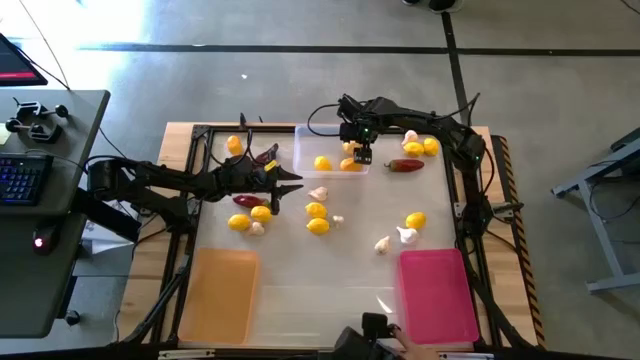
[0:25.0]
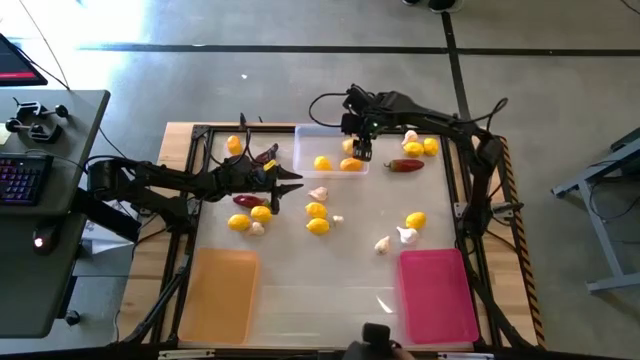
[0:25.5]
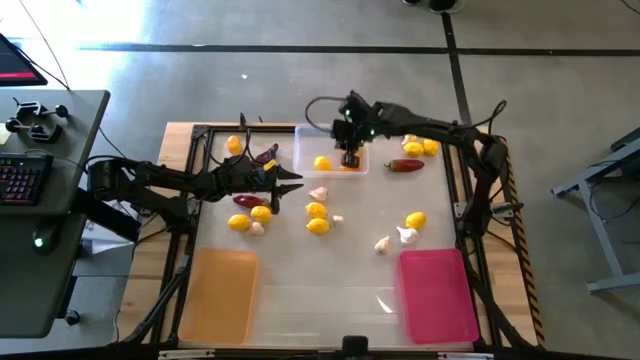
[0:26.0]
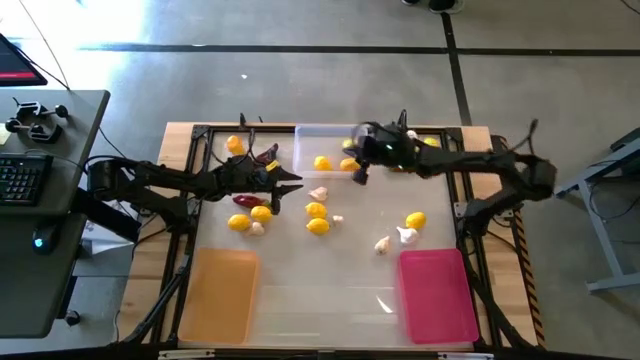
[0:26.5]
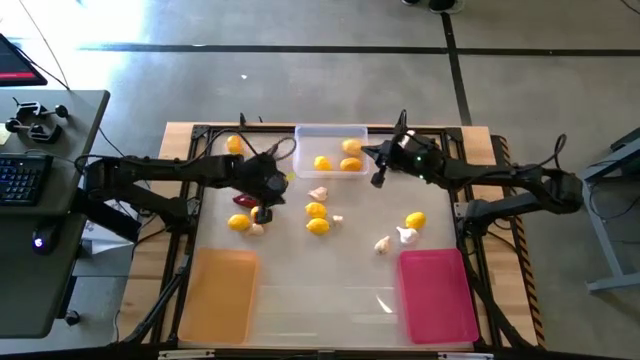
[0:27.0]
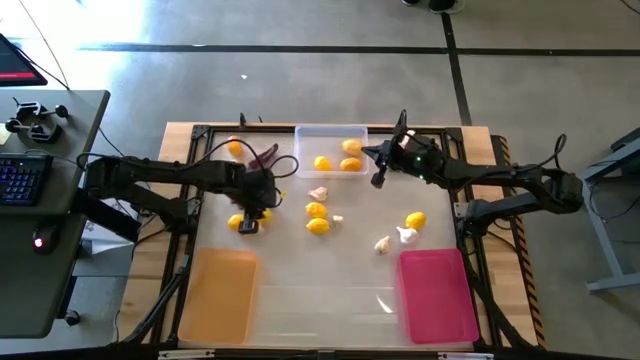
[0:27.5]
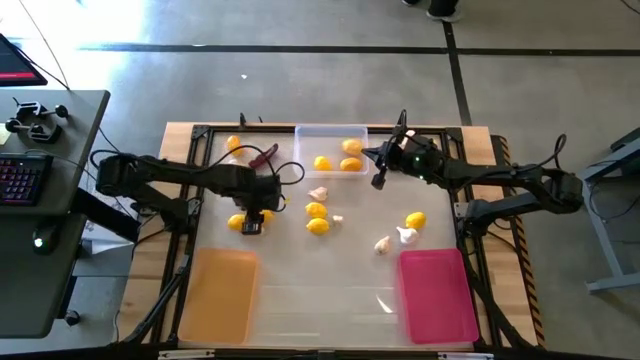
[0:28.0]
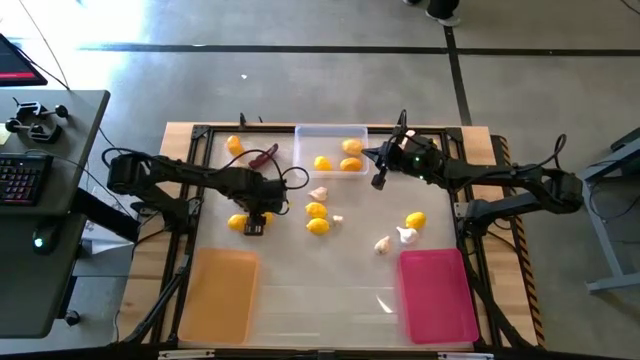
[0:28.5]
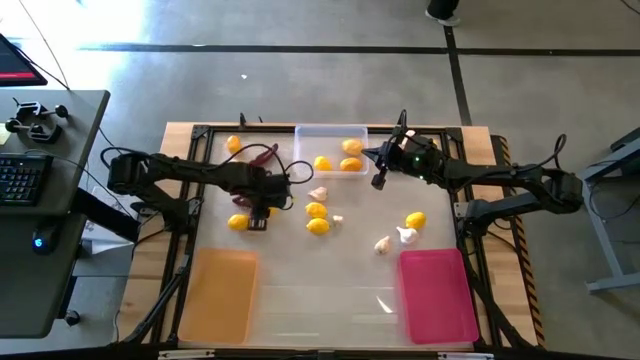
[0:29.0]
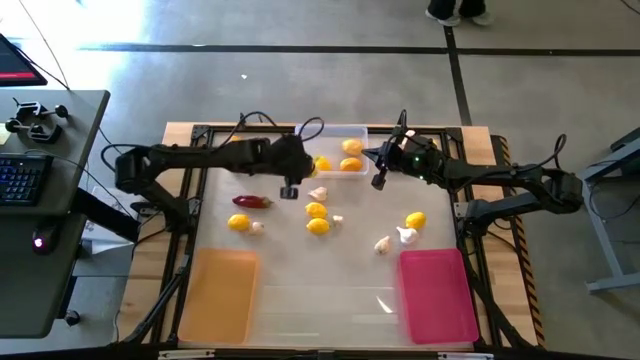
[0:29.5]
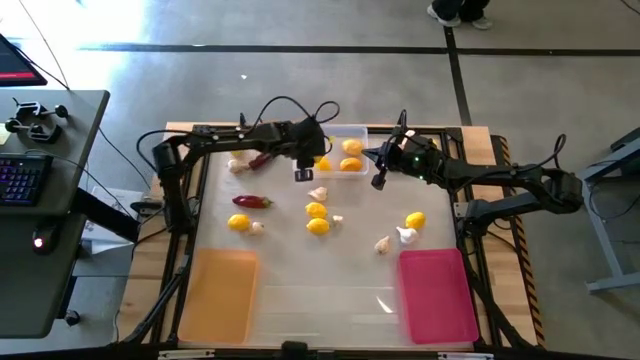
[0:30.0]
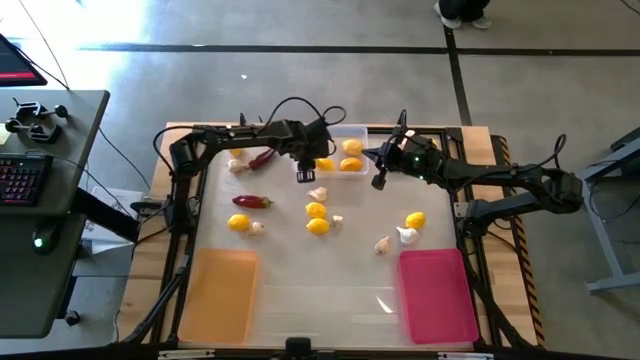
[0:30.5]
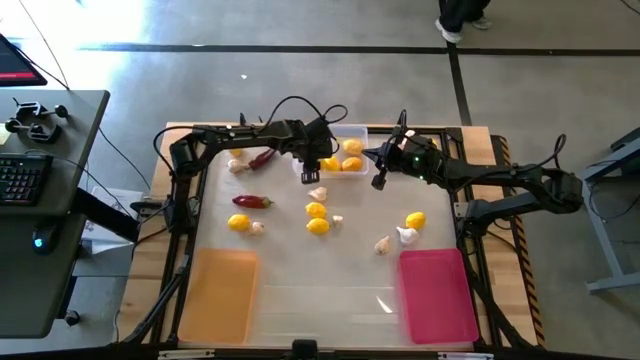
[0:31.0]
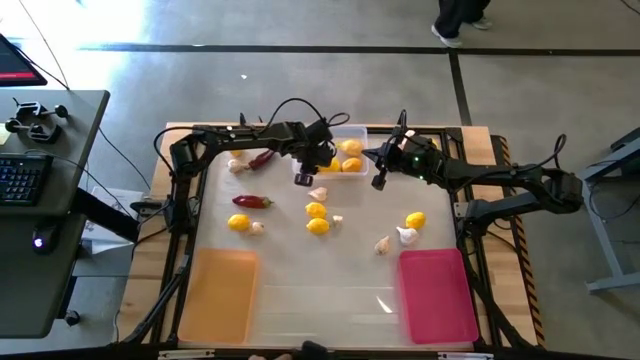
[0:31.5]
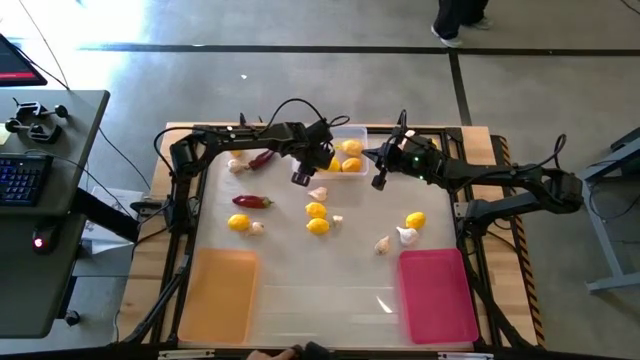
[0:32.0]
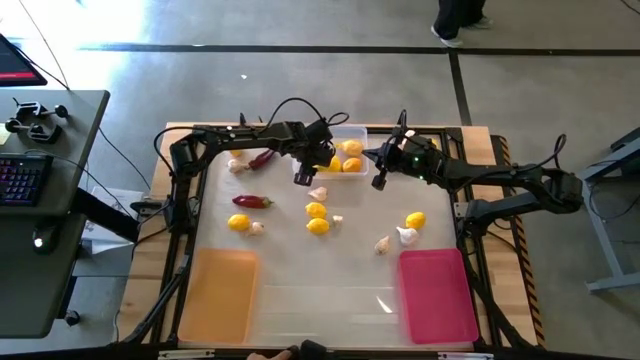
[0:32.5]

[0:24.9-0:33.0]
Task: Sort produce into baskets
Put the bottom left lemon into the transparent bin

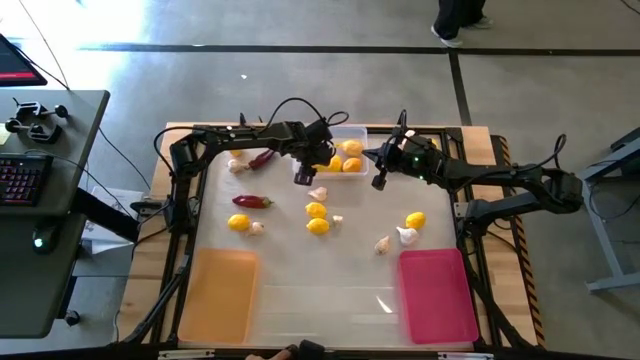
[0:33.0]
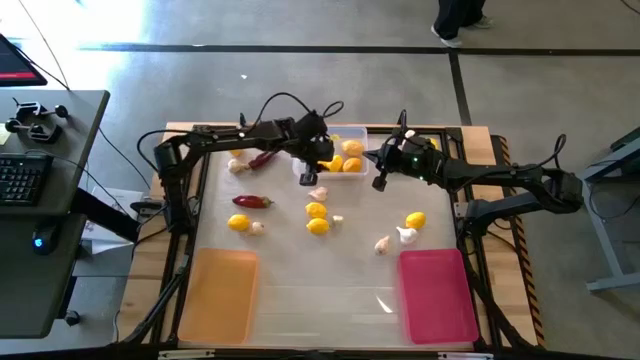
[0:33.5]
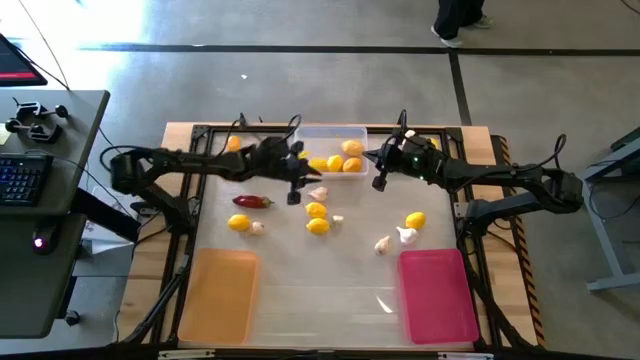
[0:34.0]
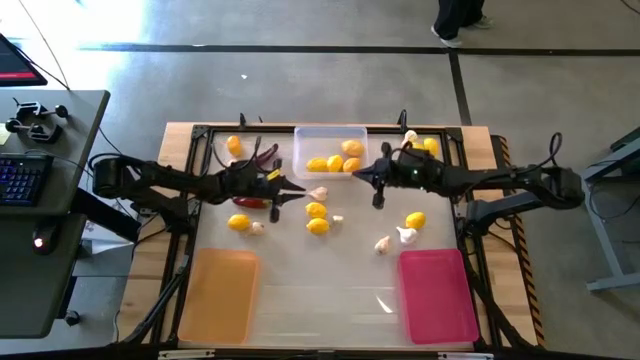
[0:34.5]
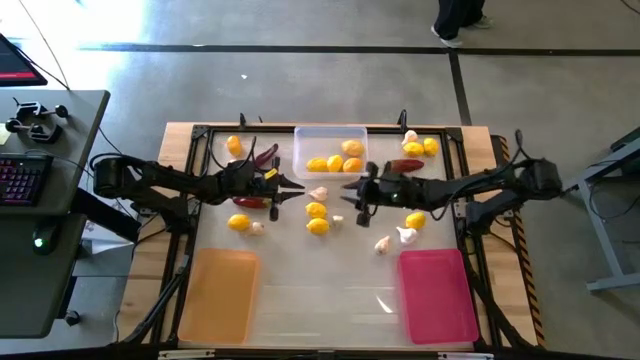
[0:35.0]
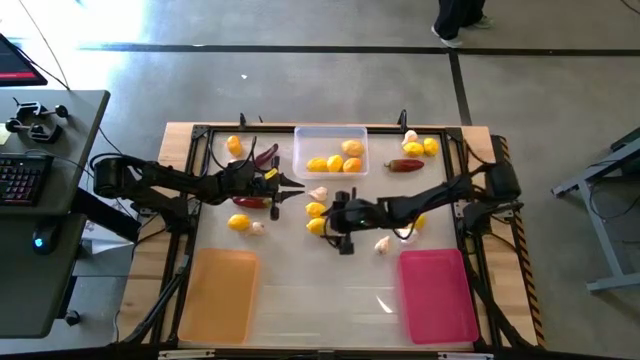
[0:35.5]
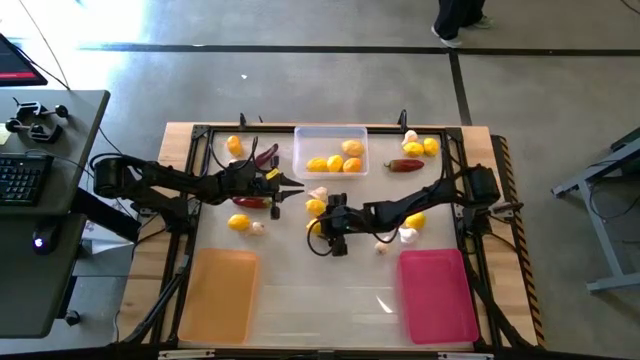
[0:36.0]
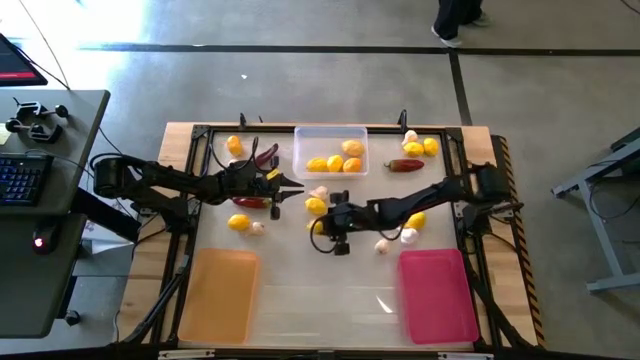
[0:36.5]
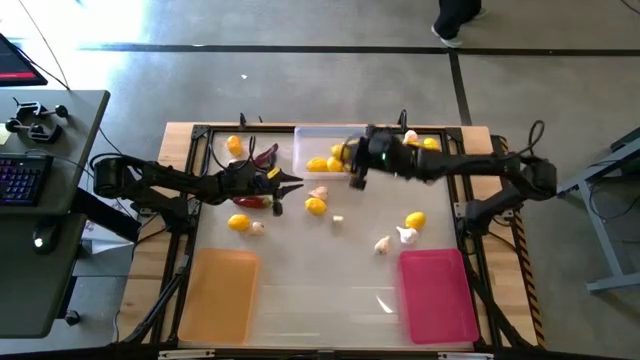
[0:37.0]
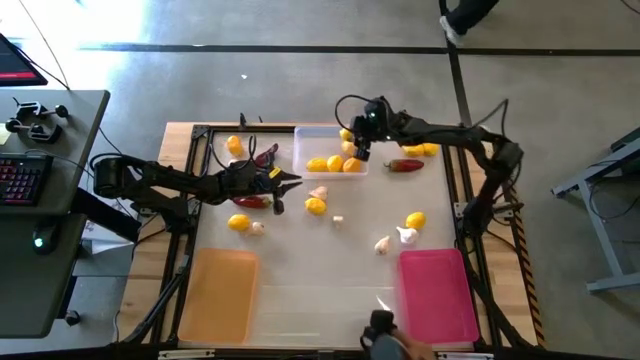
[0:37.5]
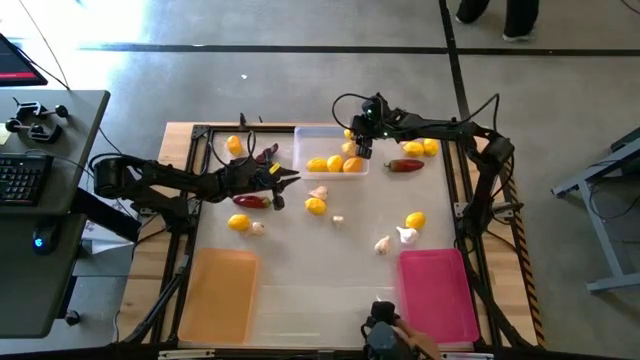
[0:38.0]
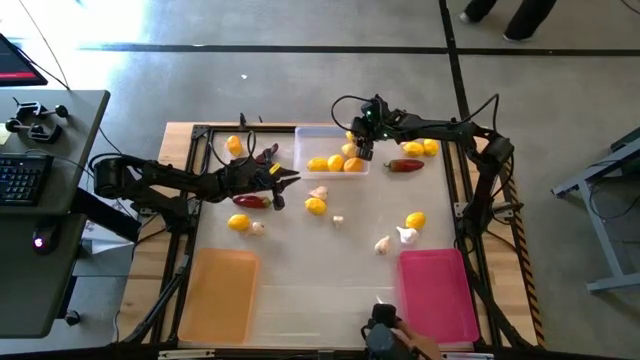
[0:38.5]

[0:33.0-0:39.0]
Put the bottom center lemon into the transparent bin

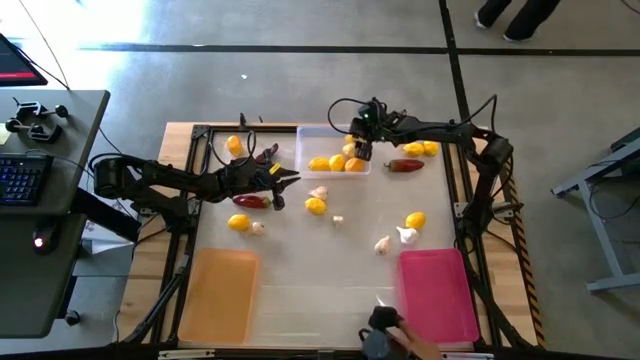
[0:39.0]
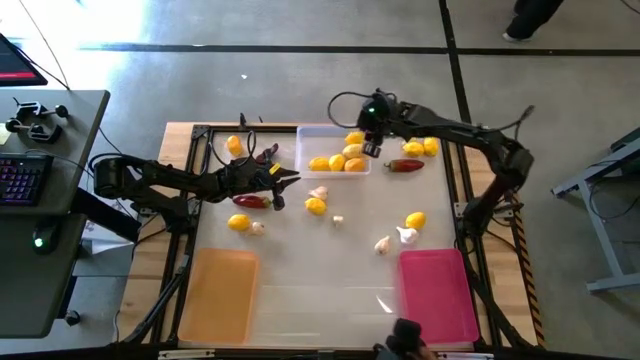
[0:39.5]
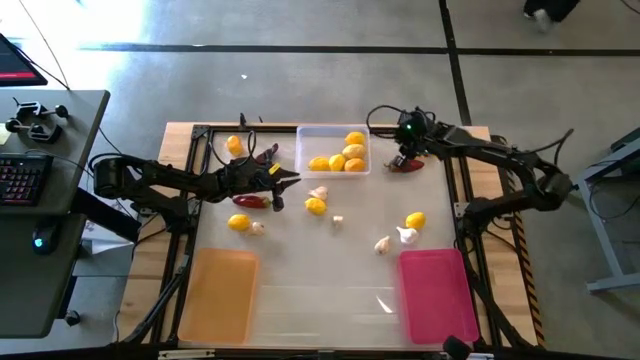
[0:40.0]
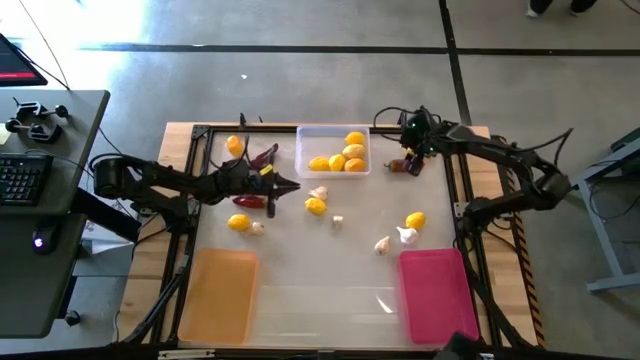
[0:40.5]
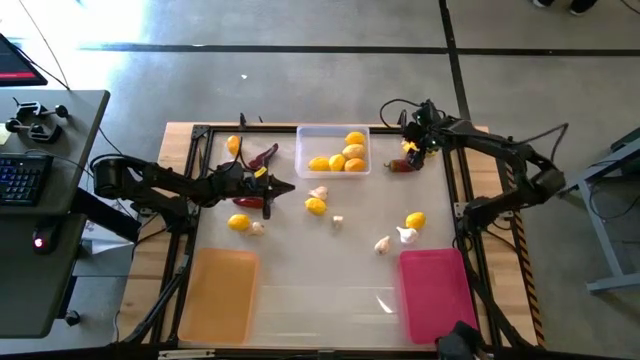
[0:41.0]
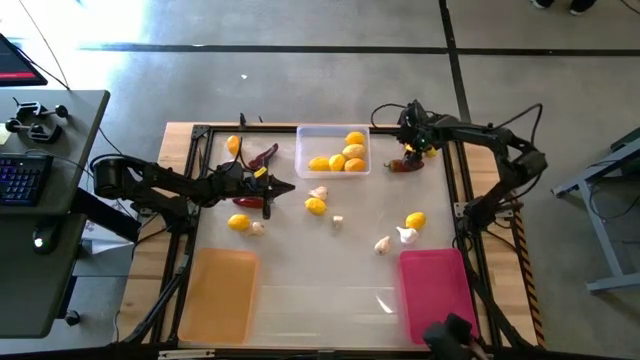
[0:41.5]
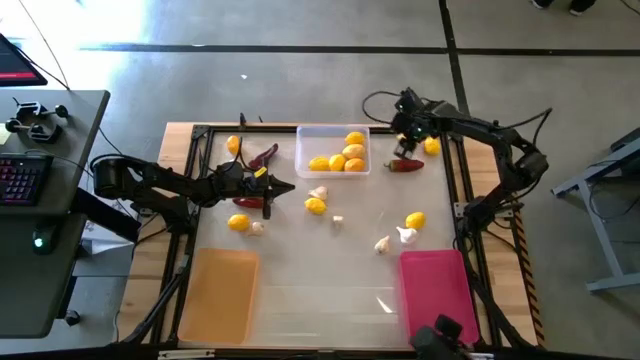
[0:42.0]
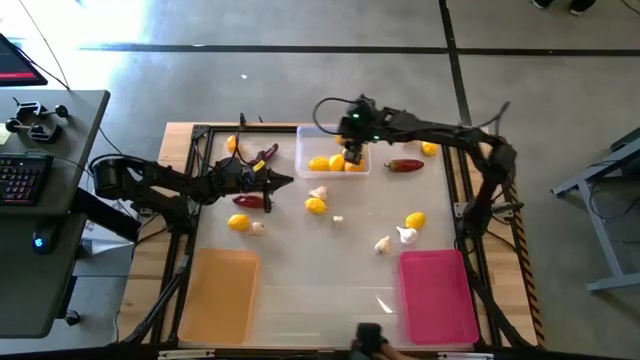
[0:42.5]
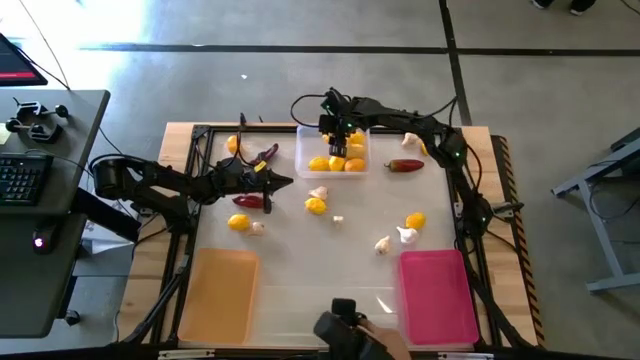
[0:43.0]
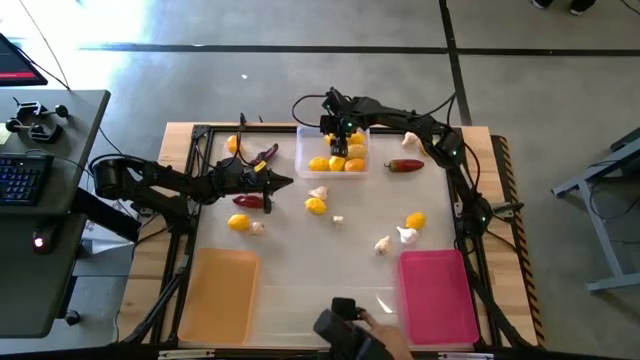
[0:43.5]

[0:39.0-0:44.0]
Put the top right lemon into the transparent bin

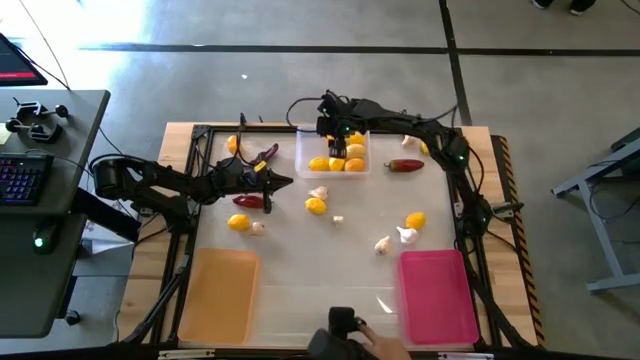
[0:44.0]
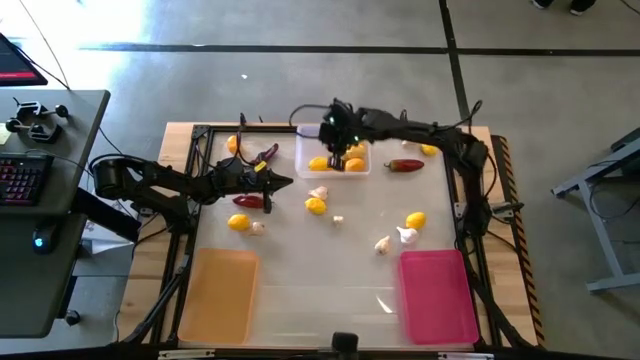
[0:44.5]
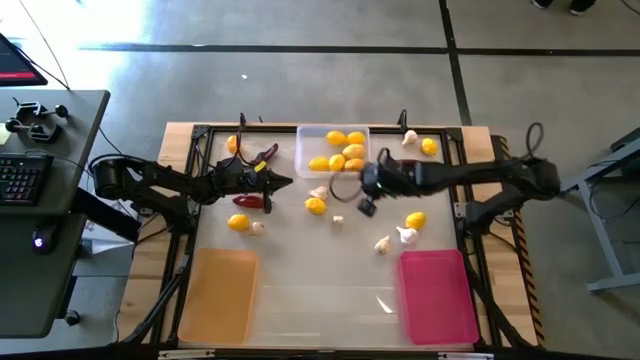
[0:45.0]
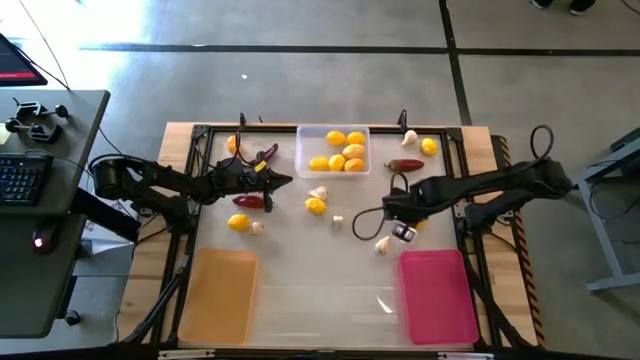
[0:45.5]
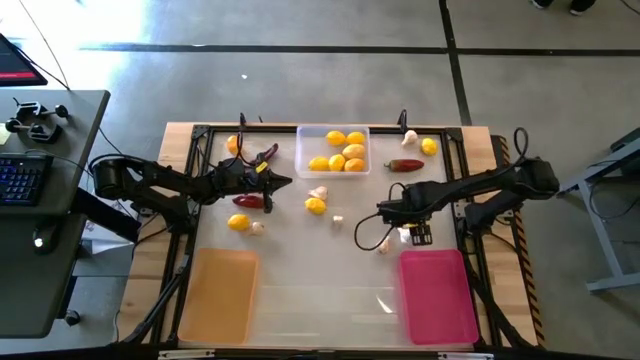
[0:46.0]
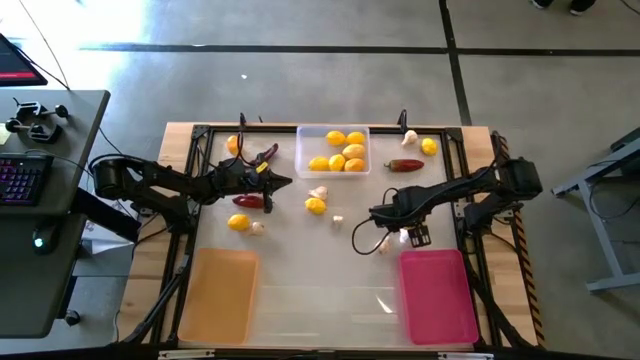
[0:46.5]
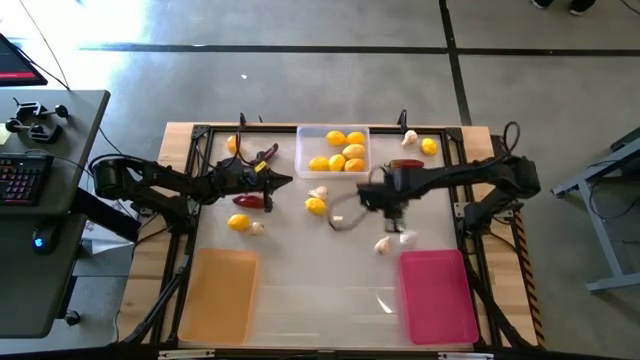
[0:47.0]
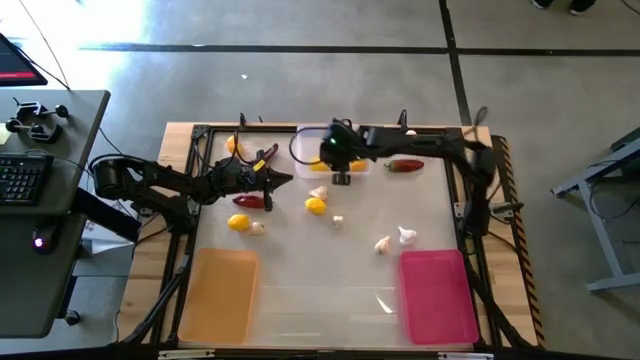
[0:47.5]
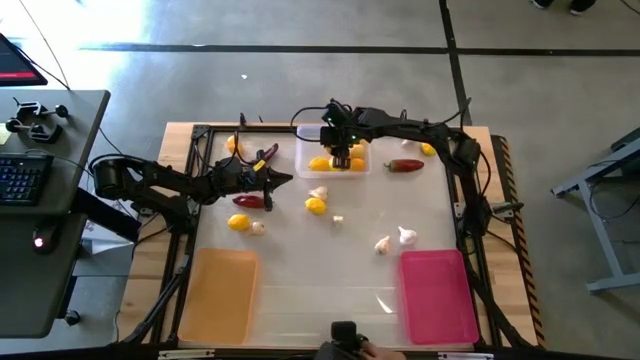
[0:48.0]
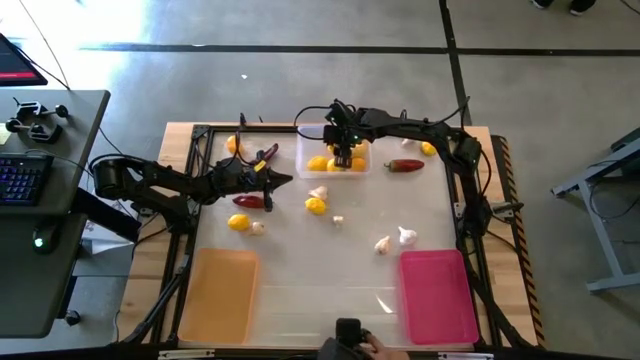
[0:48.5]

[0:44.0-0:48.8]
Put the bottom right lemon into the transparent bin
